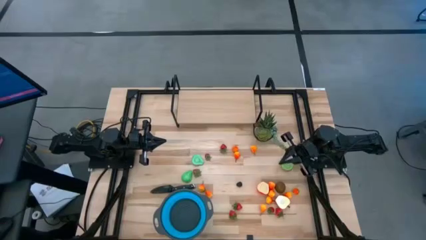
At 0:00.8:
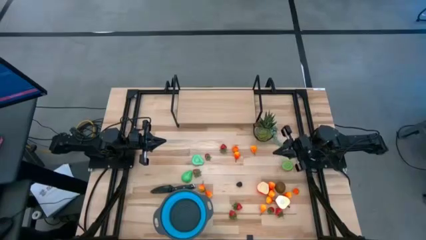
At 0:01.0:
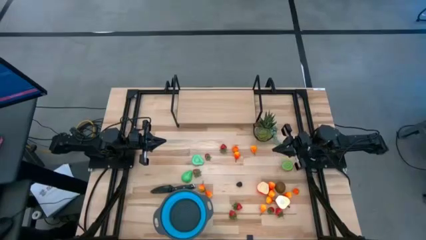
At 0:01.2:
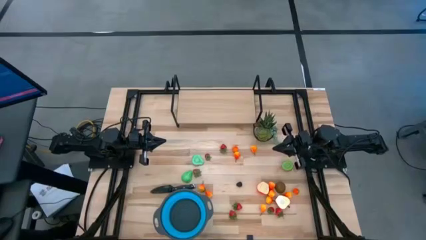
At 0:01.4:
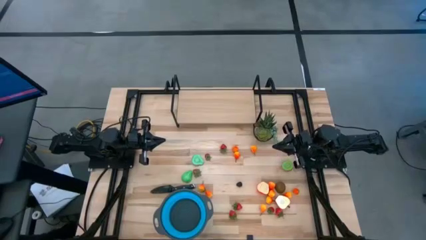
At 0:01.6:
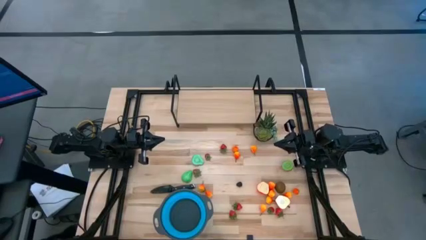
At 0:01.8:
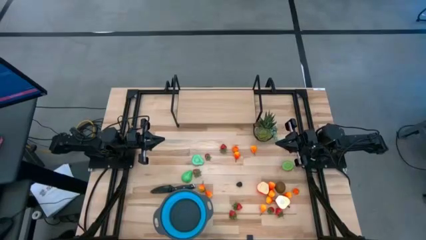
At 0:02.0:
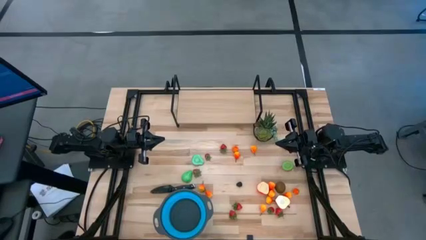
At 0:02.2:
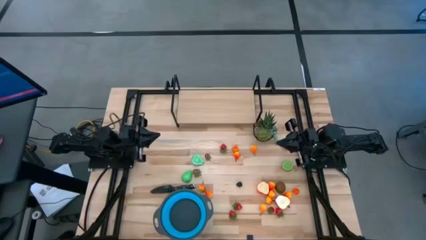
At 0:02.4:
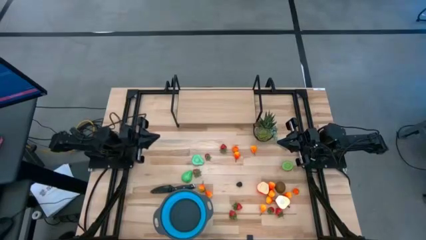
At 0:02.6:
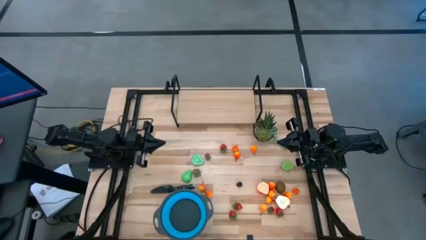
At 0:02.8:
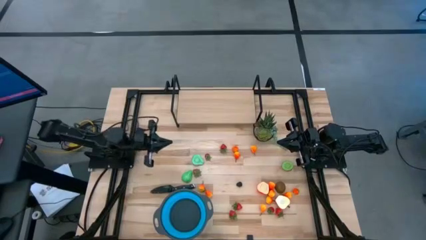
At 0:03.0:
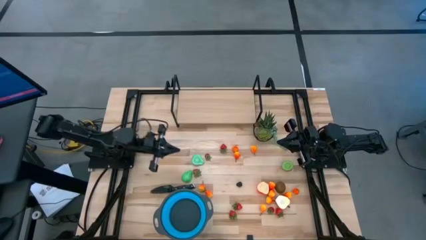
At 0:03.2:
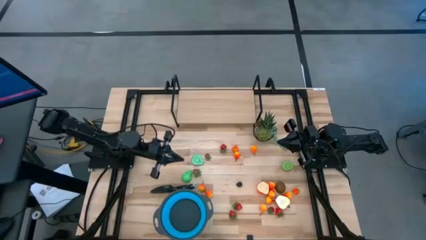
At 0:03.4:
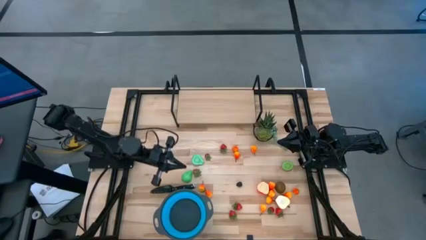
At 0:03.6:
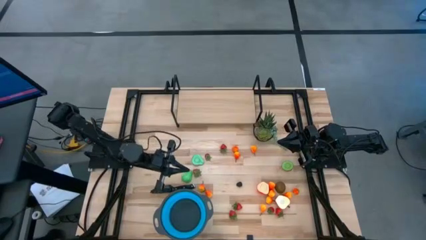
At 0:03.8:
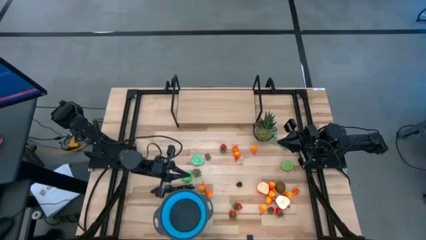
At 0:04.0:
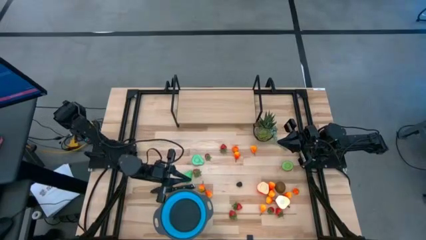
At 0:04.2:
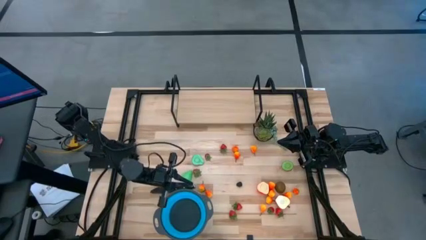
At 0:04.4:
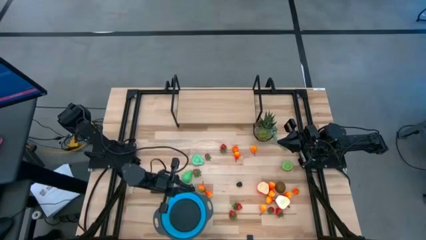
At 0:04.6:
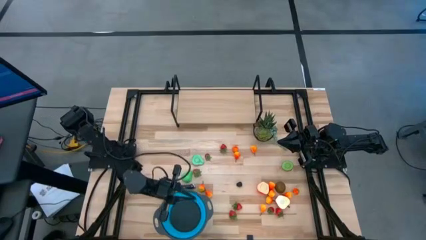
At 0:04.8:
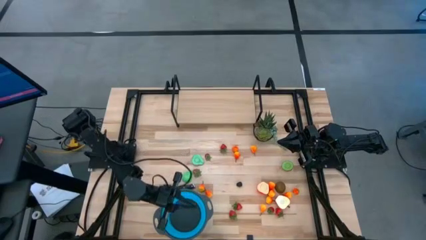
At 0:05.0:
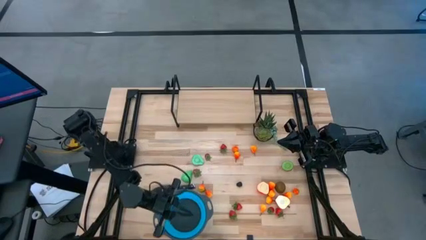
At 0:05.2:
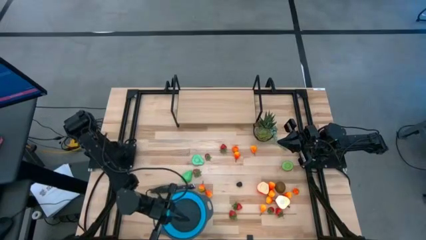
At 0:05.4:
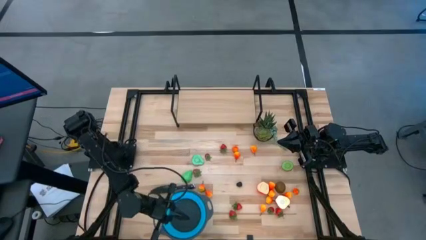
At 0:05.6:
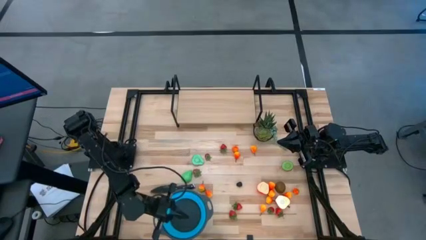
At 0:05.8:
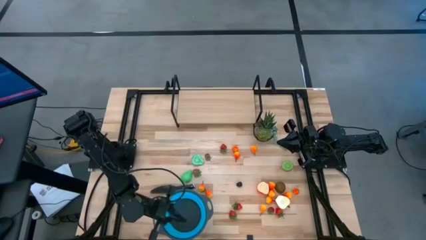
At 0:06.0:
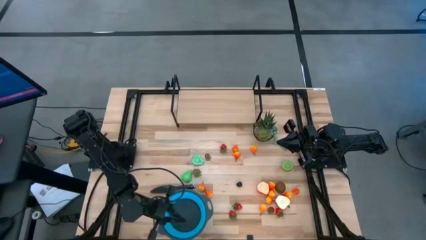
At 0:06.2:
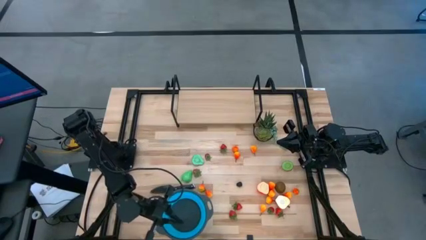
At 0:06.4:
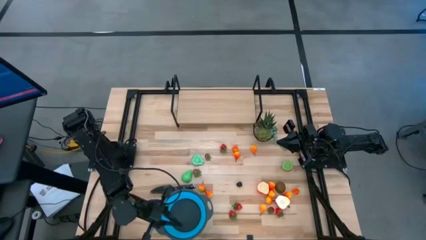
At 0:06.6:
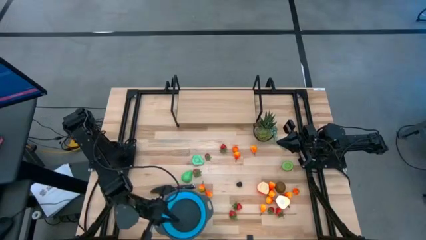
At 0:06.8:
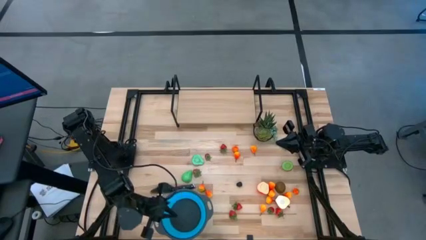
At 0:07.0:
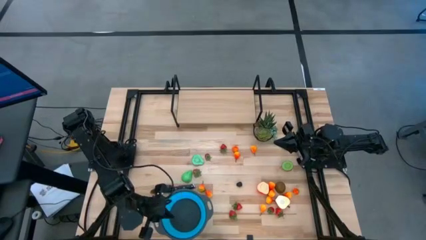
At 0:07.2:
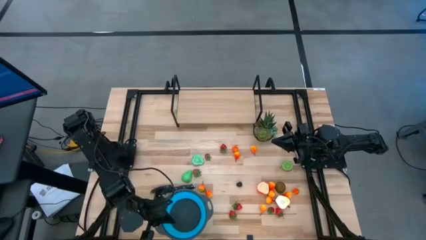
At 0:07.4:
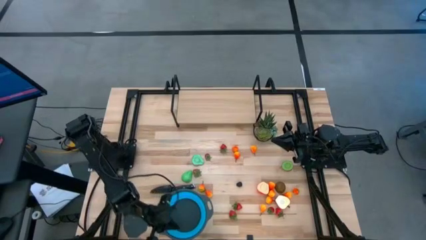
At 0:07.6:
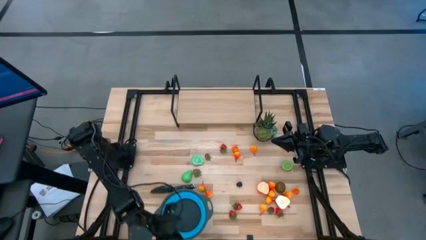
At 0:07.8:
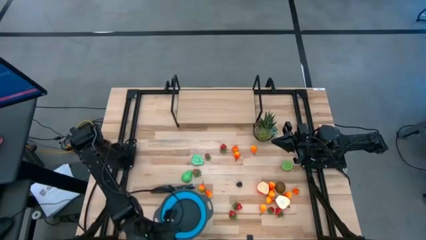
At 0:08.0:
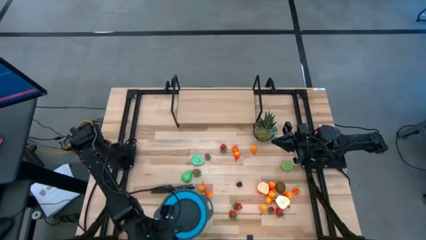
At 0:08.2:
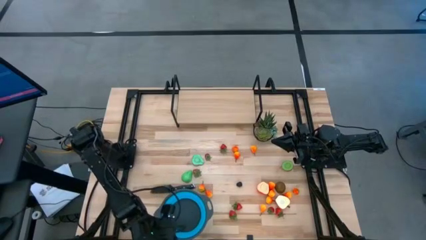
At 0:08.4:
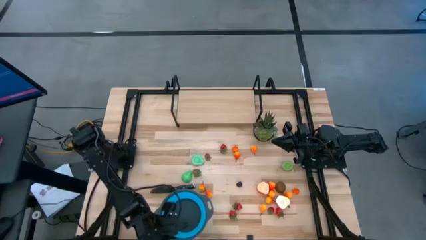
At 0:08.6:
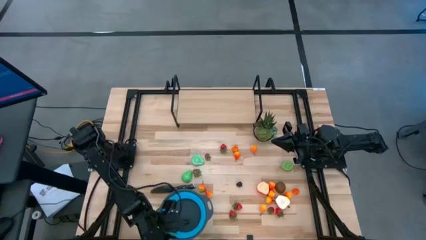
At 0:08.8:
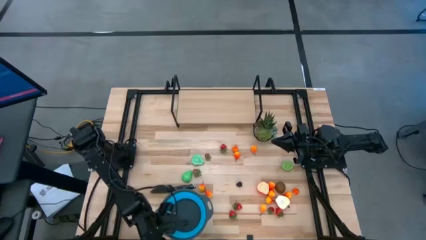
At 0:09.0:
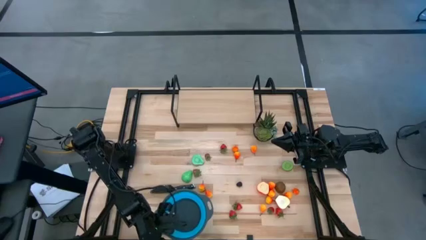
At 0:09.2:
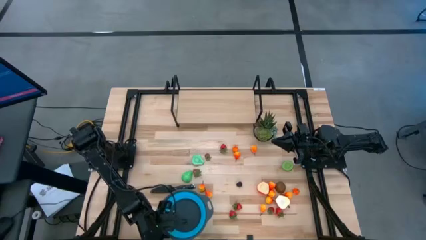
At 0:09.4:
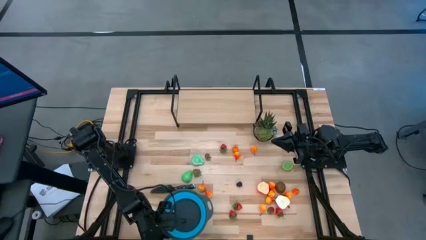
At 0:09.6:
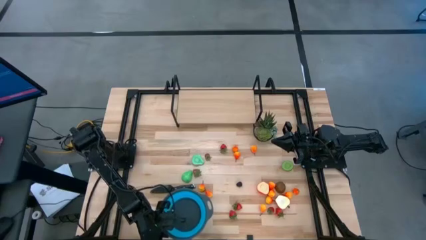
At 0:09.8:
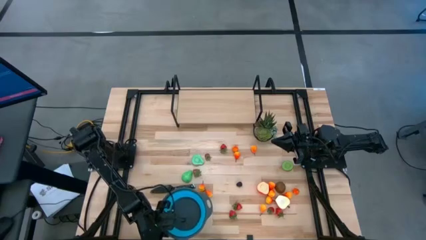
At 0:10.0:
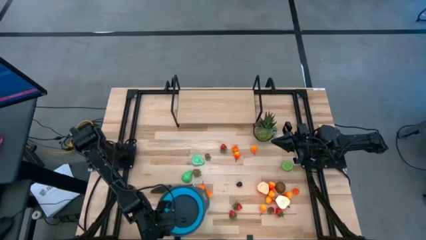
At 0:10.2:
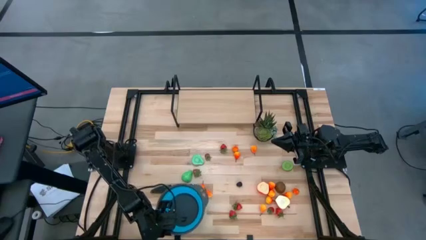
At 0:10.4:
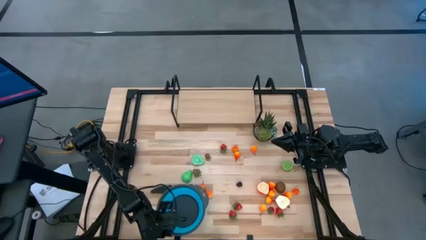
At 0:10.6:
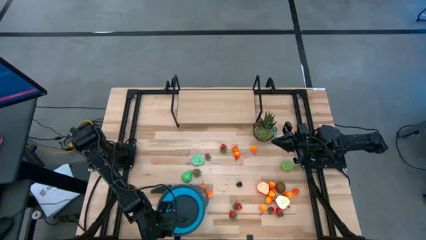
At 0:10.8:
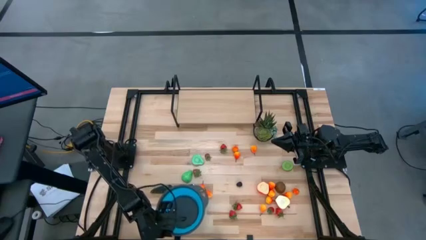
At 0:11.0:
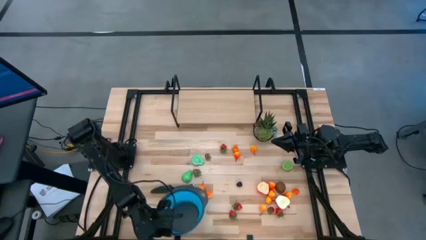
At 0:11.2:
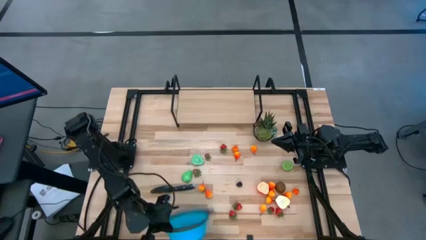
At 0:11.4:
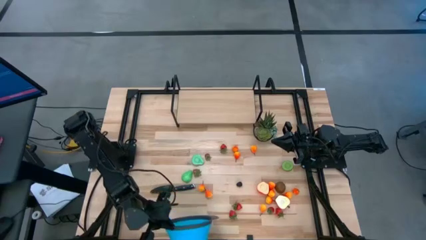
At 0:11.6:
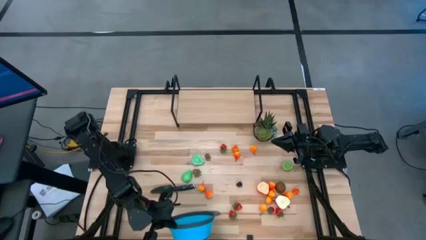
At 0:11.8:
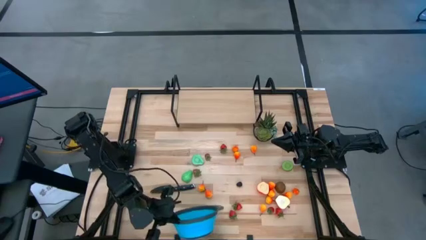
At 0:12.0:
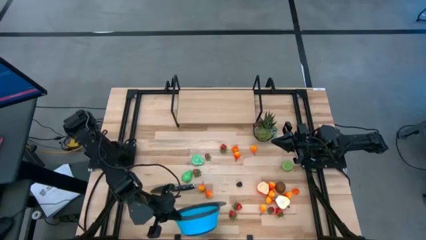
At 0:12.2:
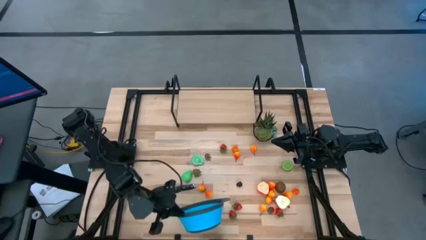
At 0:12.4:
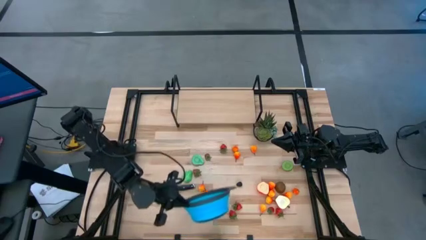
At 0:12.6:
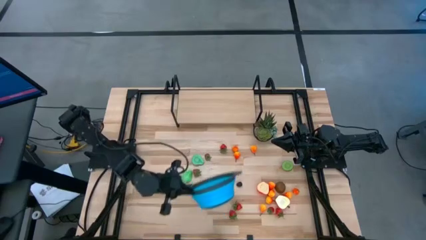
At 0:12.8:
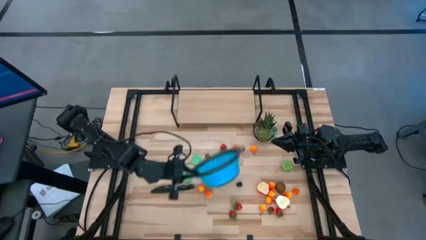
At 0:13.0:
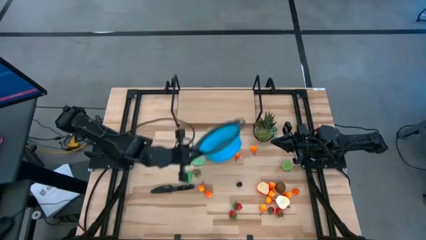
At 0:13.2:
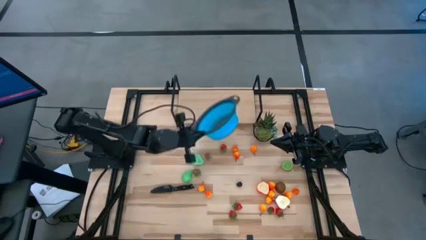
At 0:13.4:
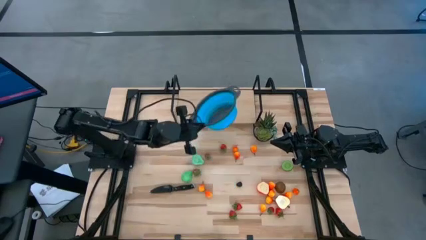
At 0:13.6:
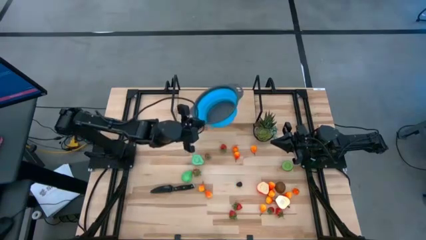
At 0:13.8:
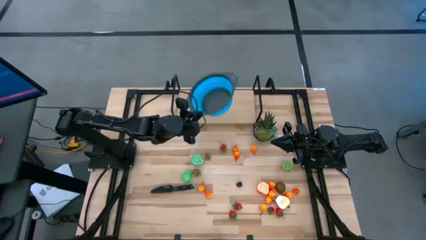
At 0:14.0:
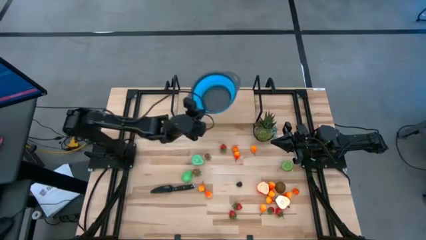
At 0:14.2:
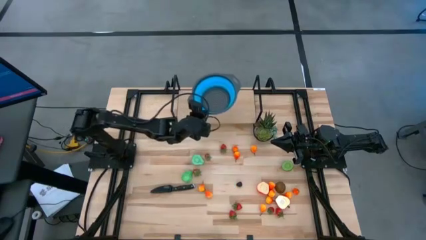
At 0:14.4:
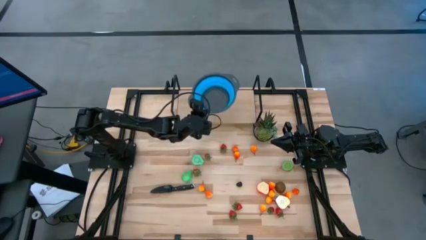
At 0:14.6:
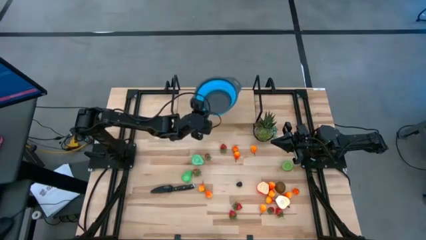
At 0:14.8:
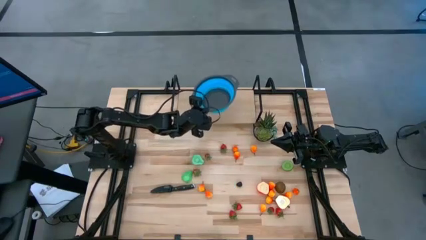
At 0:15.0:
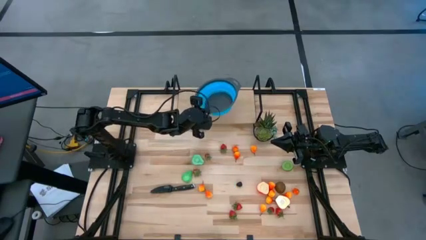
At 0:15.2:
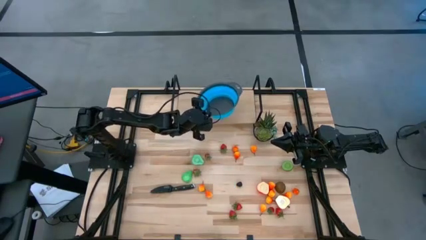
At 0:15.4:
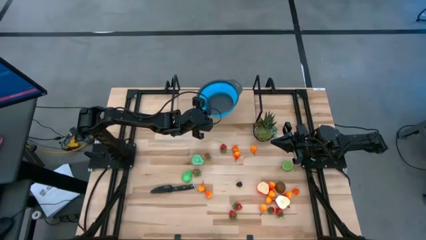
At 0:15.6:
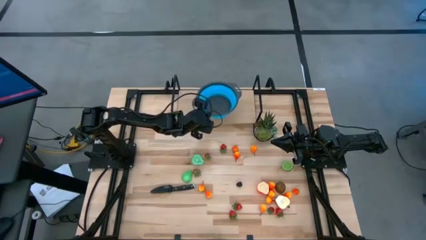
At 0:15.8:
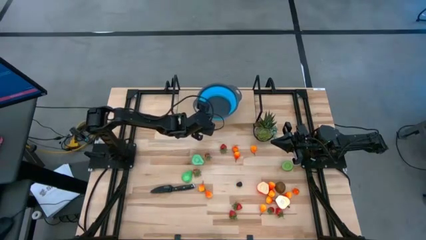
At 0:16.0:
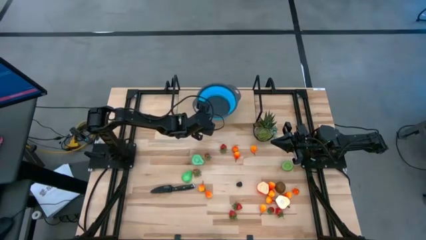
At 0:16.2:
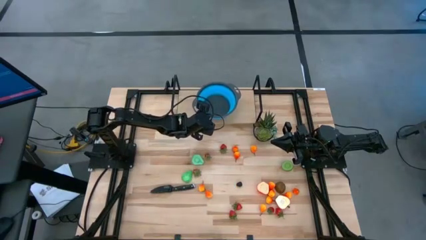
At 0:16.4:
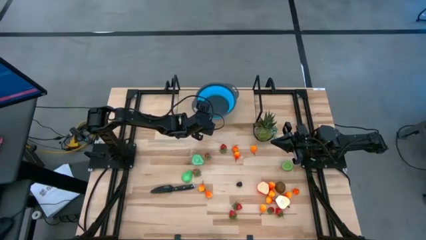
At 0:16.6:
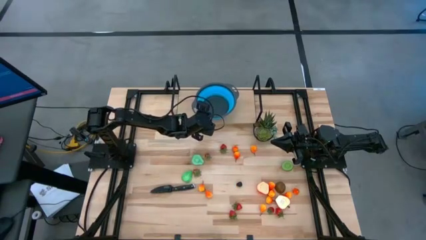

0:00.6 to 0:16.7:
Task: Pick & Place Fruit
Put the basket on the shelf
